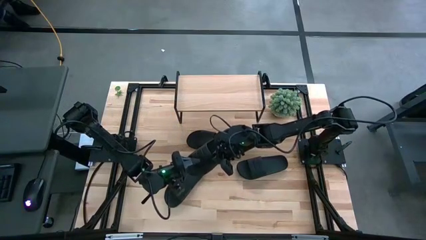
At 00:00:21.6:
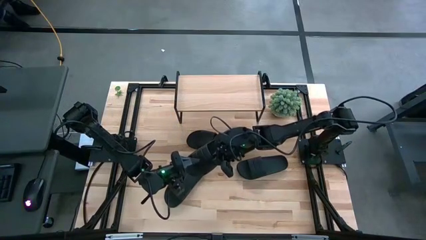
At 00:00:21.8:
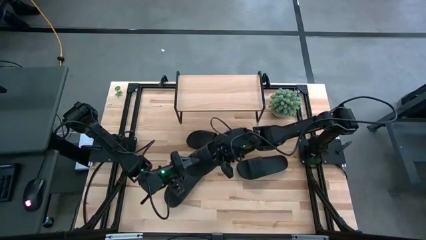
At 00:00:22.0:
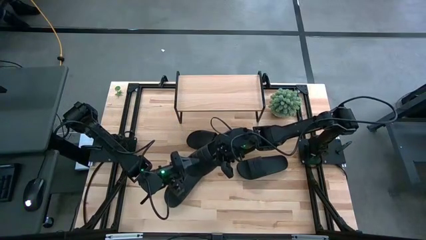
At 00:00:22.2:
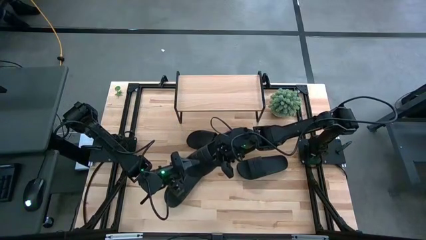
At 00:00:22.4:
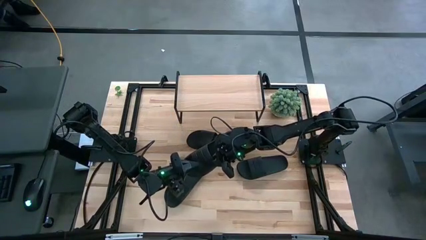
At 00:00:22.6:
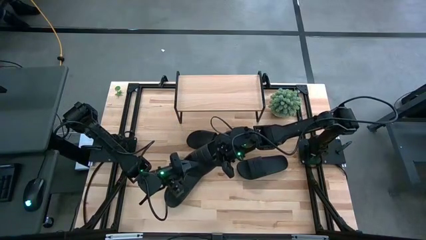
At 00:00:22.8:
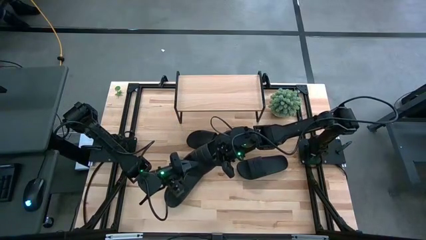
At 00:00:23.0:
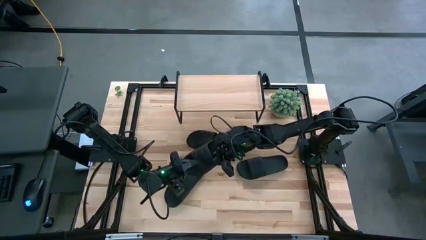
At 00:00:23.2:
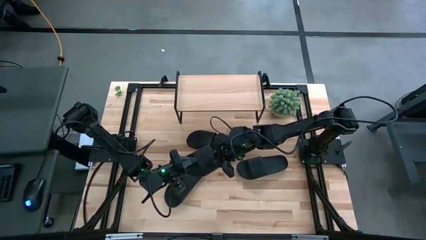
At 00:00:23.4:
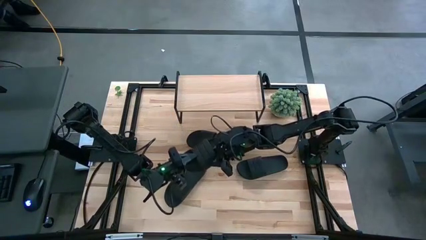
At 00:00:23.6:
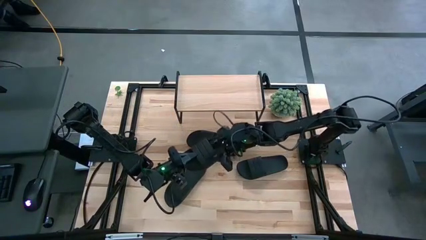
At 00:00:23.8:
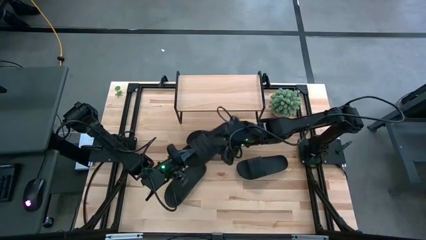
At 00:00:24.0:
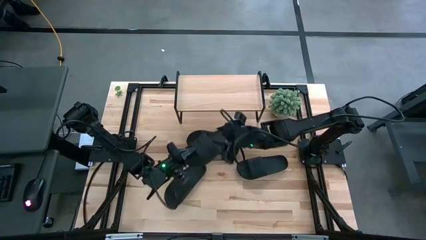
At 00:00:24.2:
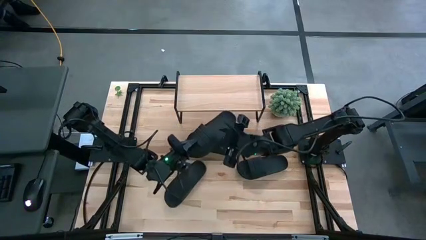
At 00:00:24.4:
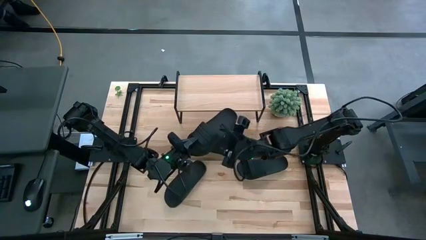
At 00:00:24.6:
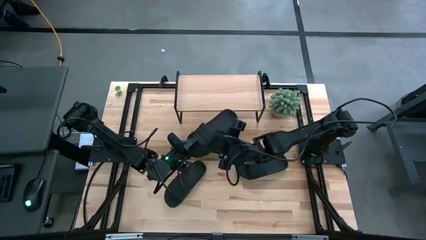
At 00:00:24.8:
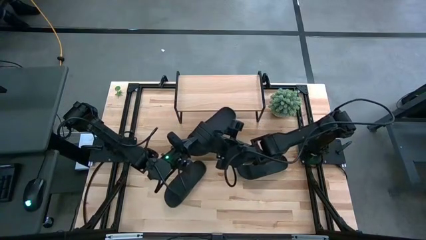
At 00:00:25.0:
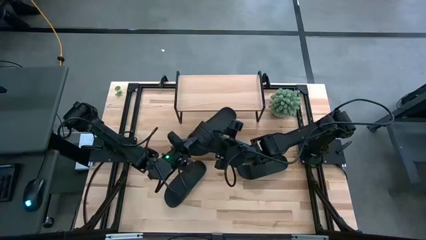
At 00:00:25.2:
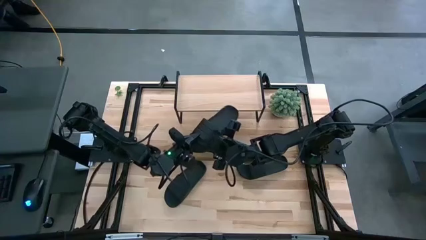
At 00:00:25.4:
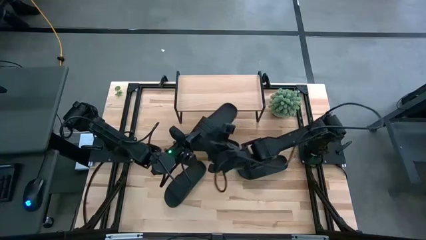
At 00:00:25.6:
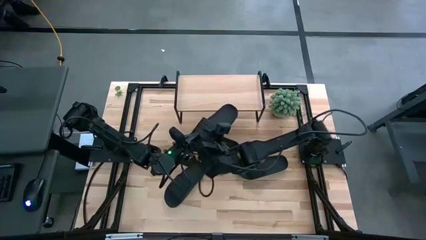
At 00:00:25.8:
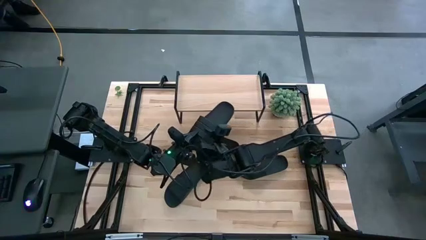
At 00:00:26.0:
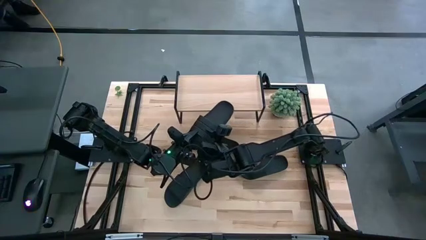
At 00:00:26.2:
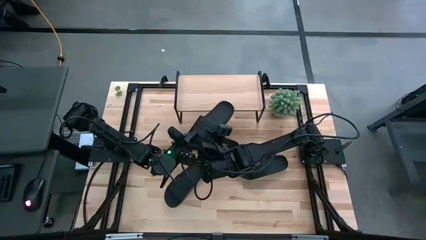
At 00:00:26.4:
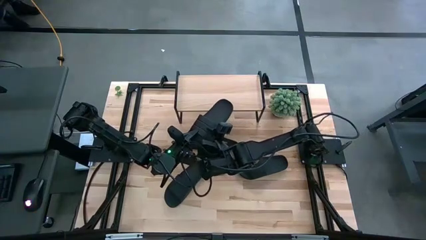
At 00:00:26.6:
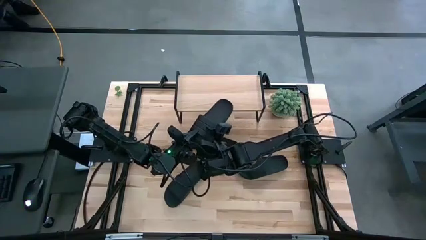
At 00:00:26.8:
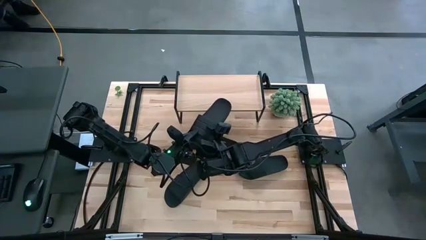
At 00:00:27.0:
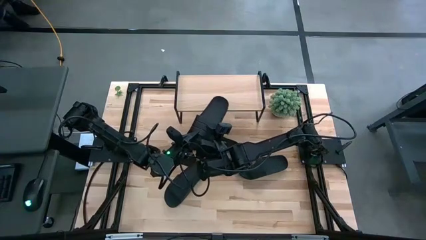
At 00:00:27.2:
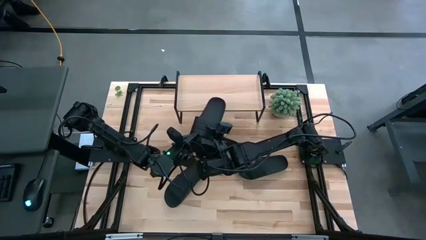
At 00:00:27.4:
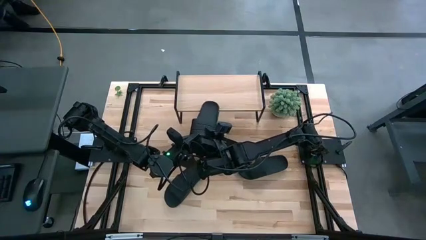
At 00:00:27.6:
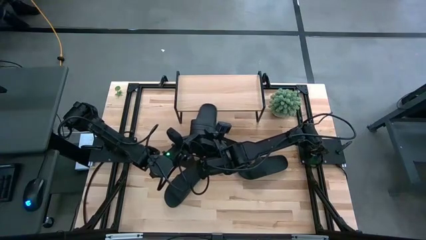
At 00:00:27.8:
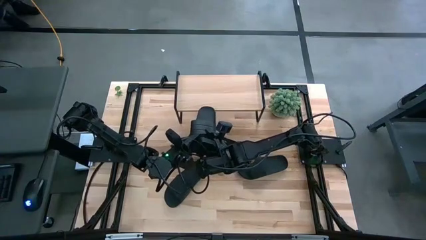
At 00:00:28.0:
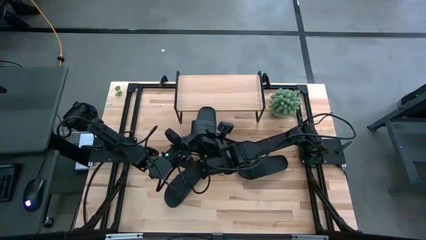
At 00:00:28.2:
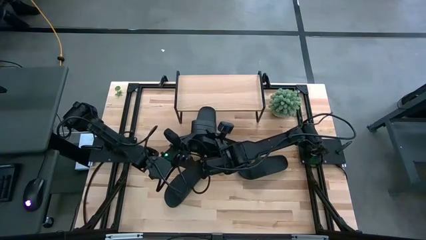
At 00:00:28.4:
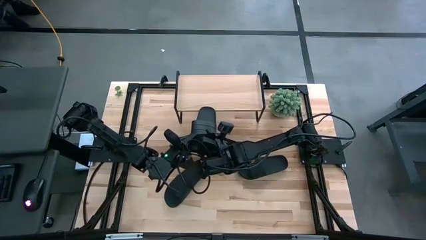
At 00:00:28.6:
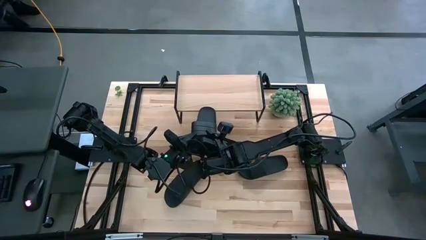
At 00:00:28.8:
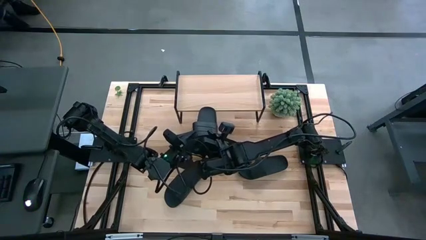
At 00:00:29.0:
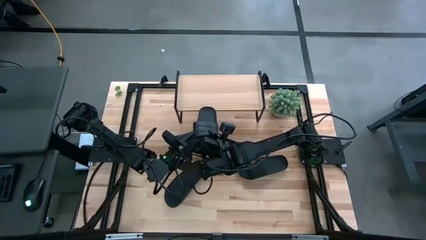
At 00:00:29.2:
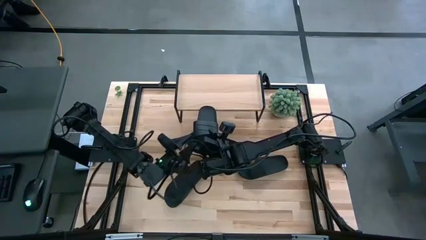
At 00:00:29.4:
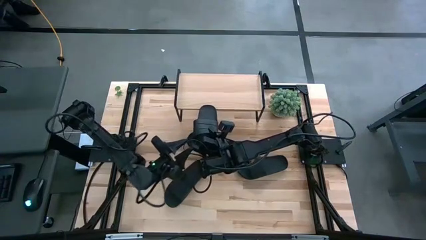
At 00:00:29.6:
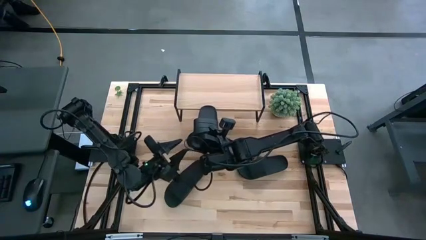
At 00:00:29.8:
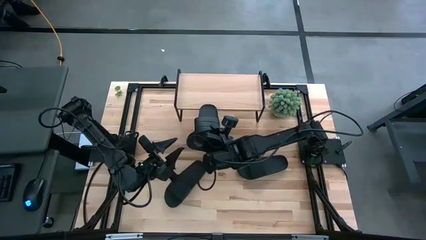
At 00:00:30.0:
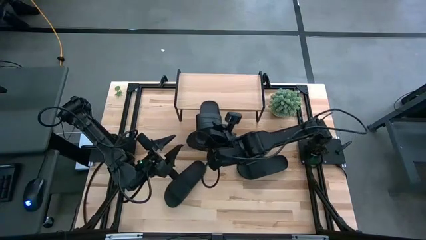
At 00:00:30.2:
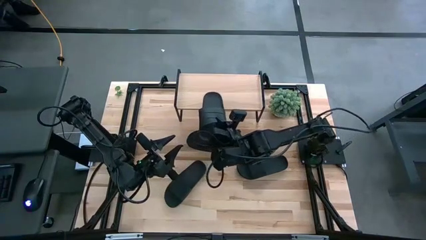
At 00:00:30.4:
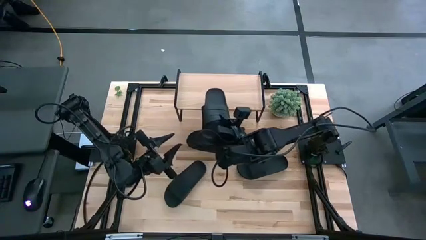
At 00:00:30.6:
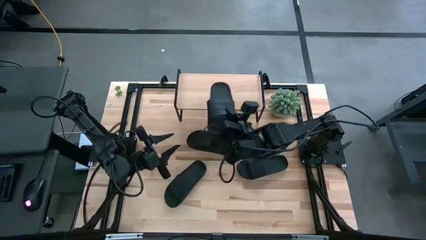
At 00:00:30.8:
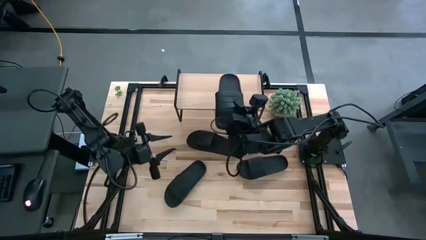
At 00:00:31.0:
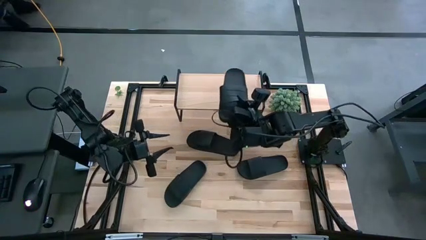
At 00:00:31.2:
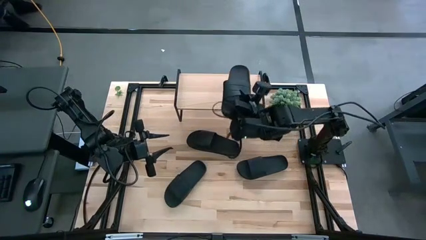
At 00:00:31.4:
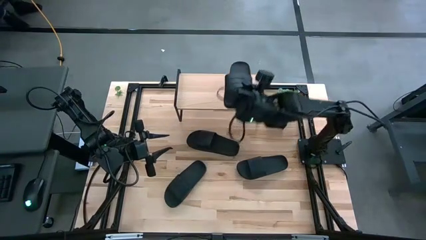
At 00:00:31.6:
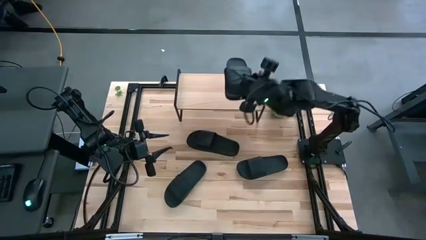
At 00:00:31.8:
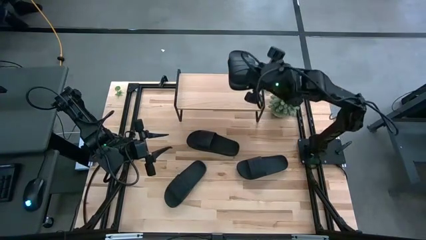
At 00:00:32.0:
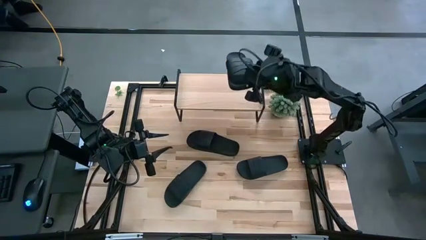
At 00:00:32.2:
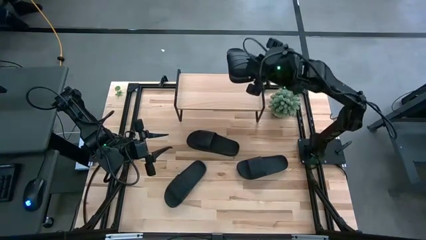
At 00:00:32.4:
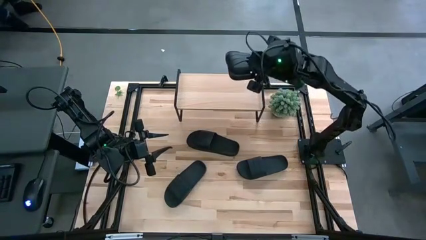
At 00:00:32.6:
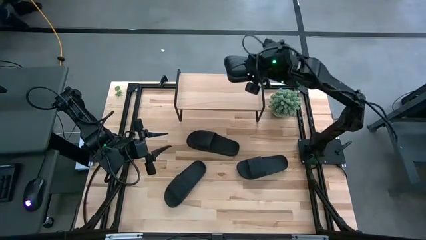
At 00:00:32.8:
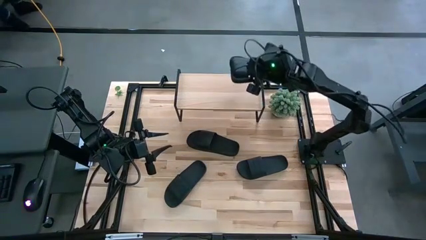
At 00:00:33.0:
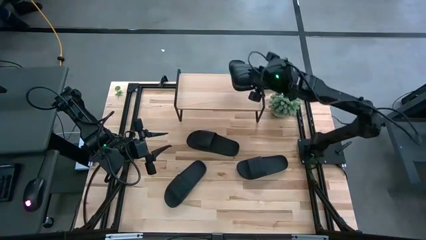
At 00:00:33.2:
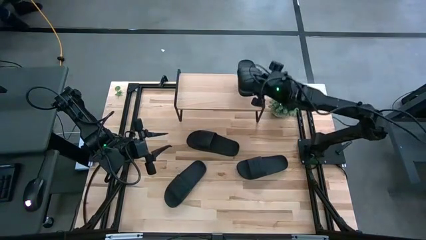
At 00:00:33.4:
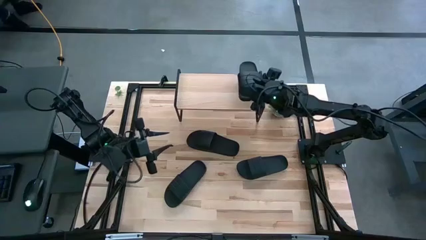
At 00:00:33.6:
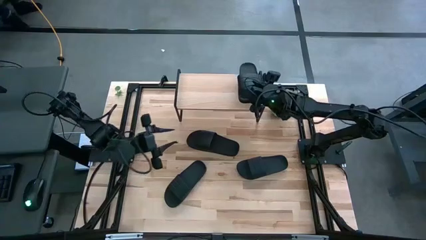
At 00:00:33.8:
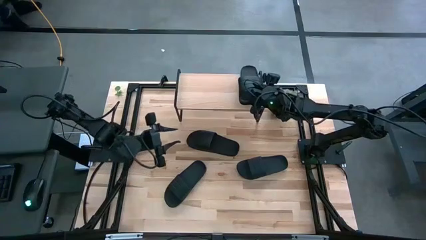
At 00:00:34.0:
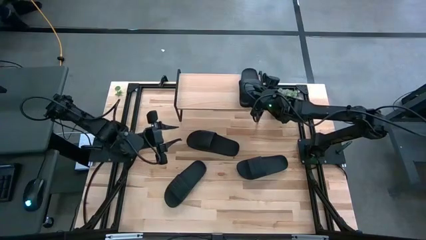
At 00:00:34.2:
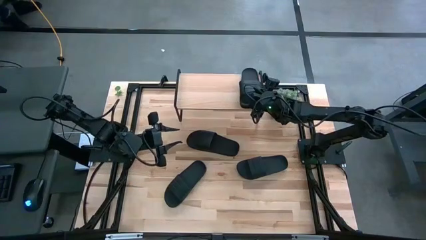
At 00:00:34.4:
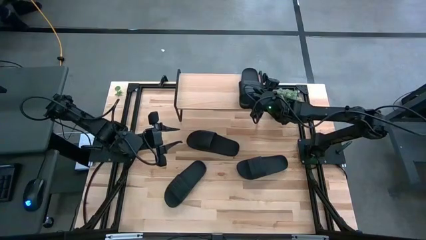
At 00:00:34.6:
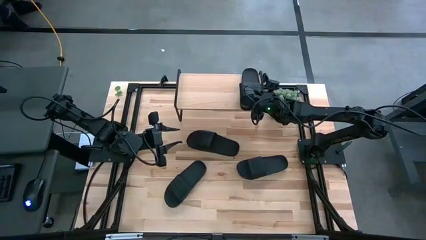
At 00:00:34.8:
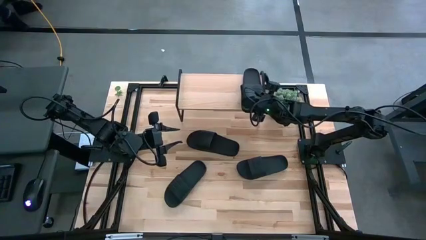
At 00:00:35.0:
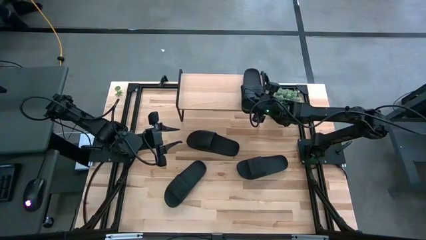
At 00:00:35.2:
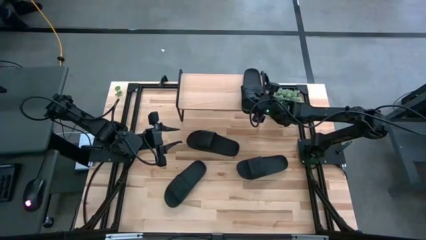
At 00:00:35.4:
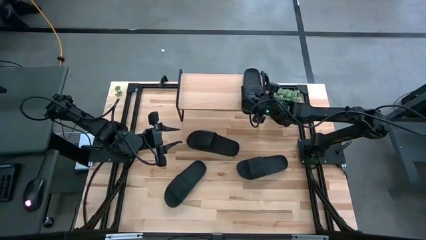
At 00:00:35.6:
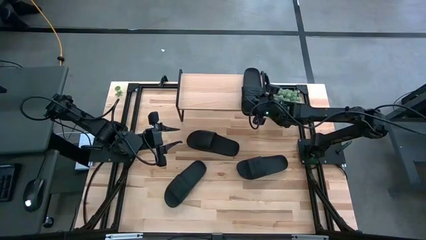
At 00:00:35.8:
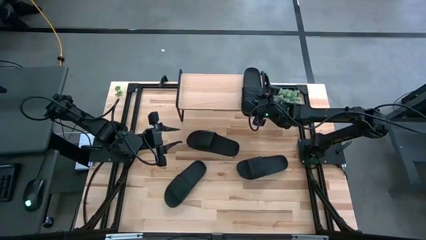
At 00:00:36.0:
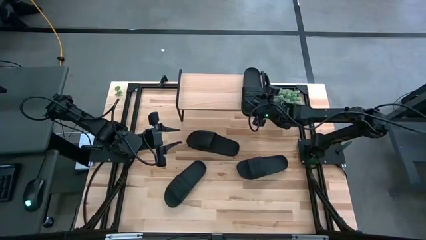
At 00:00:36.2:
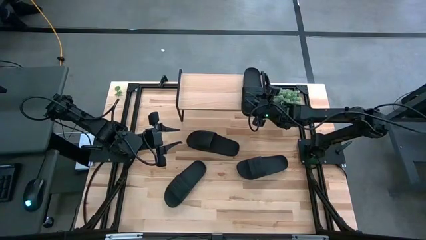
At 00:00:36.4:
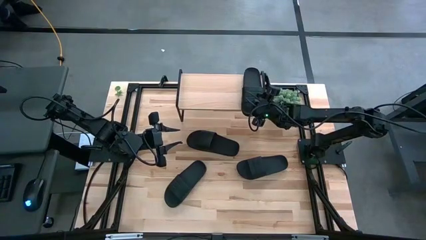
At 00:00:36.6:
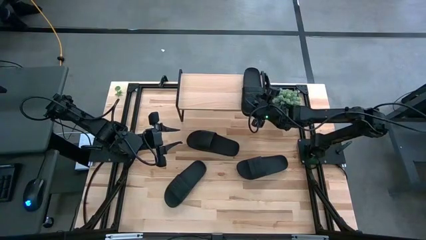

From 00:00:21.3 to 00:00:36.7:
Task: Pick and place slides into the shelf
Put the black slipper on the shelf
